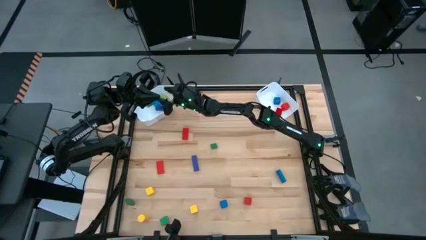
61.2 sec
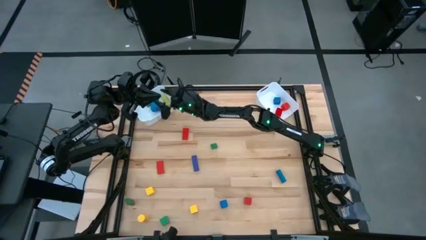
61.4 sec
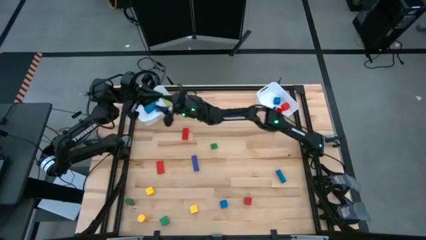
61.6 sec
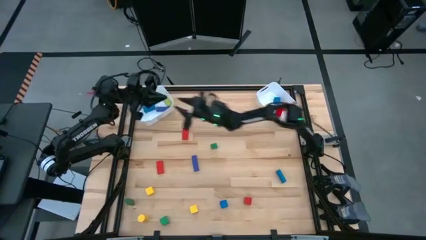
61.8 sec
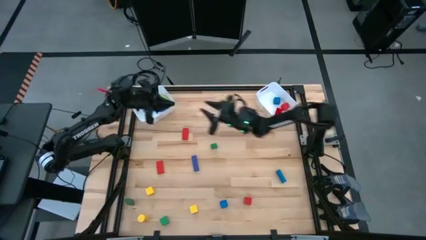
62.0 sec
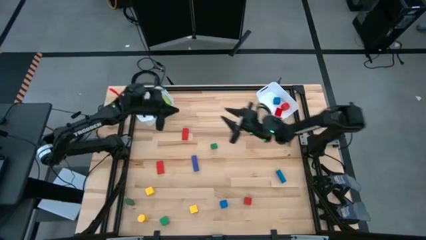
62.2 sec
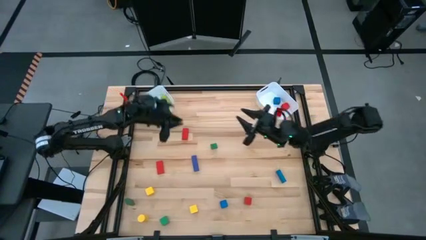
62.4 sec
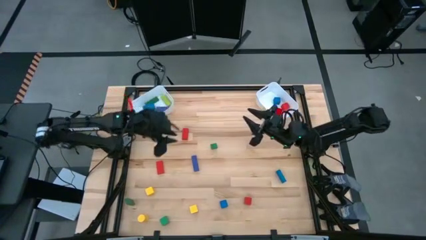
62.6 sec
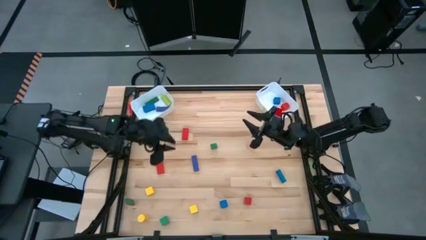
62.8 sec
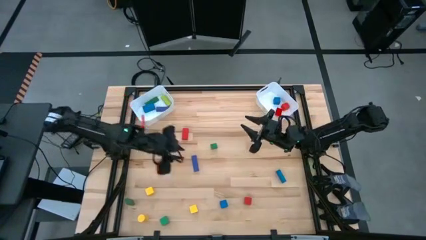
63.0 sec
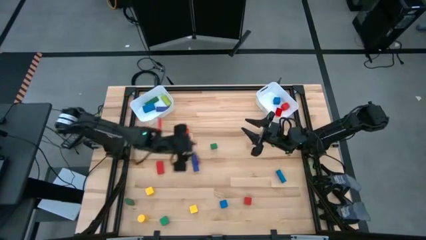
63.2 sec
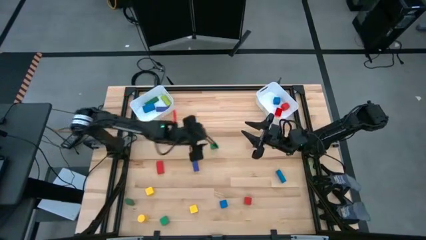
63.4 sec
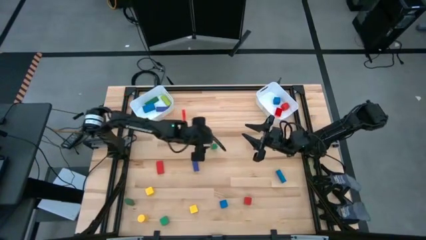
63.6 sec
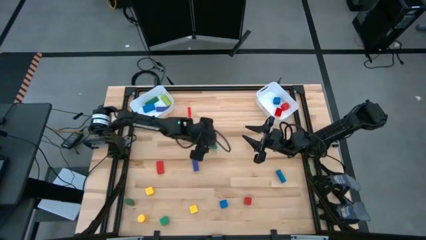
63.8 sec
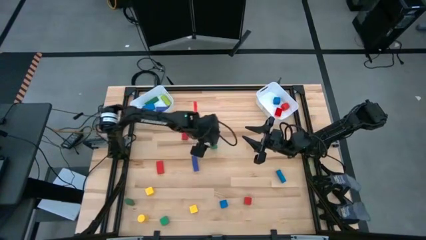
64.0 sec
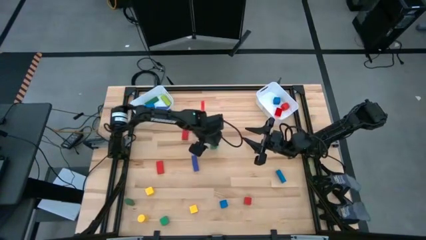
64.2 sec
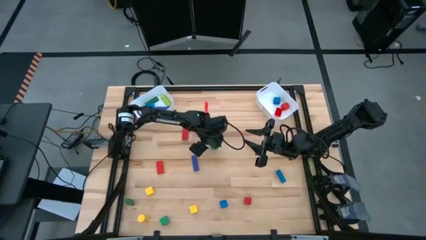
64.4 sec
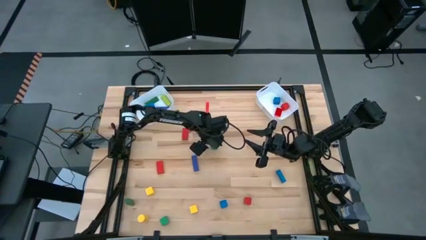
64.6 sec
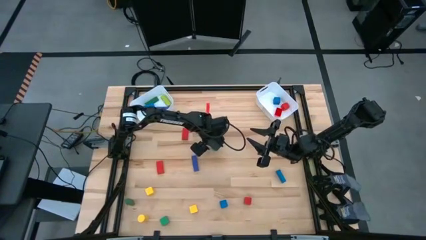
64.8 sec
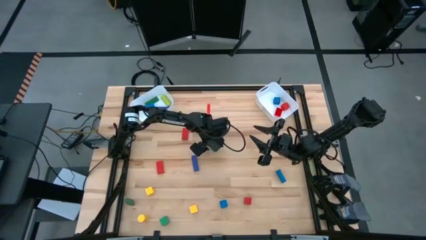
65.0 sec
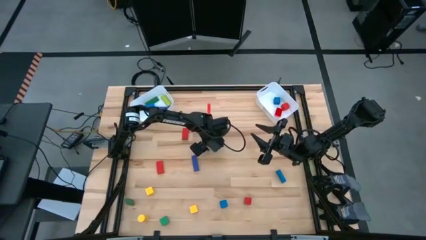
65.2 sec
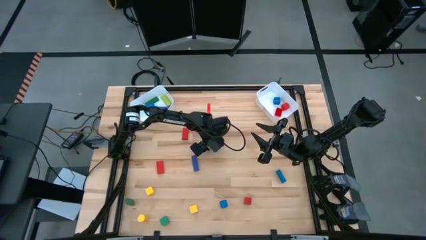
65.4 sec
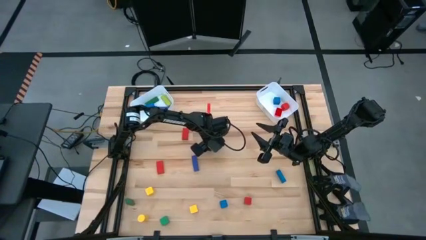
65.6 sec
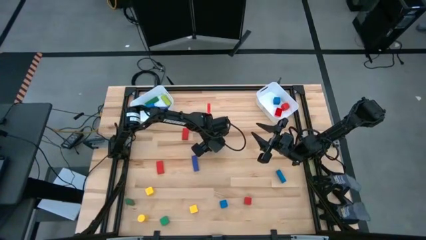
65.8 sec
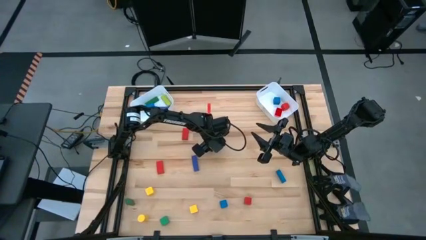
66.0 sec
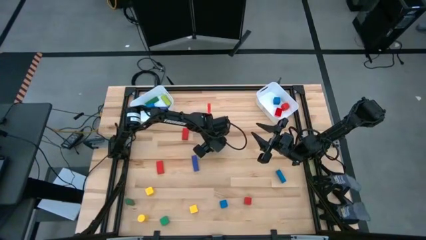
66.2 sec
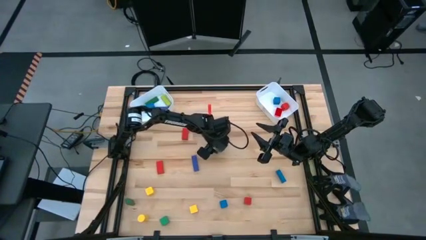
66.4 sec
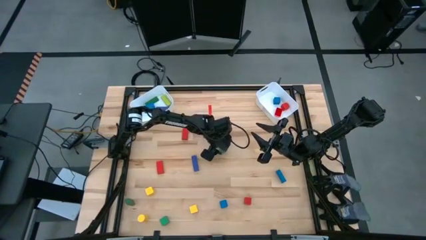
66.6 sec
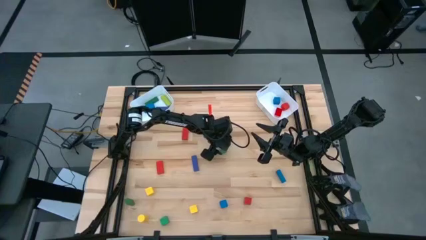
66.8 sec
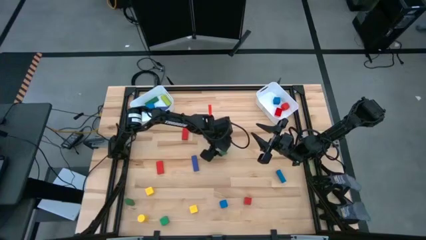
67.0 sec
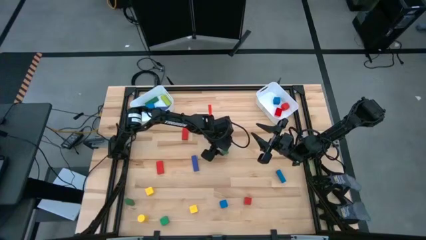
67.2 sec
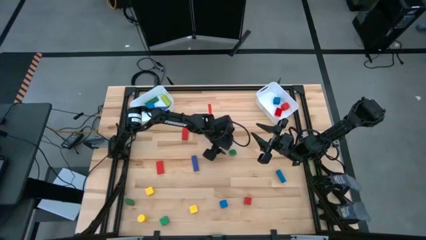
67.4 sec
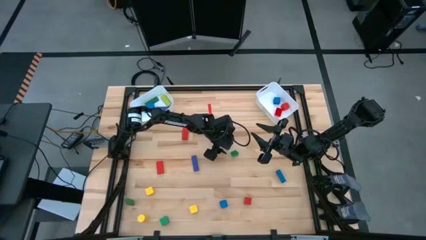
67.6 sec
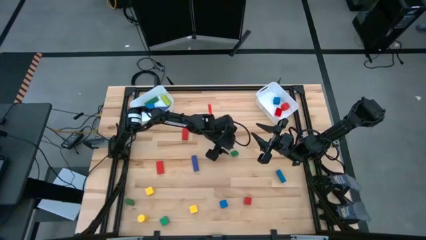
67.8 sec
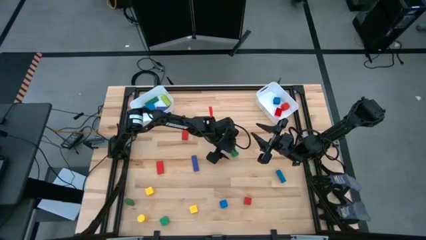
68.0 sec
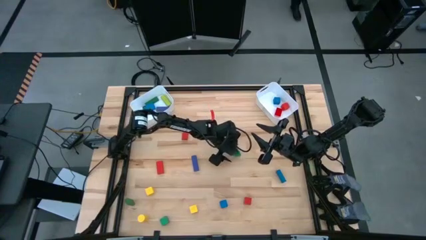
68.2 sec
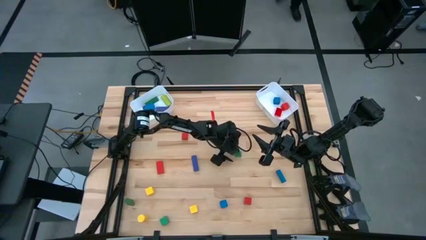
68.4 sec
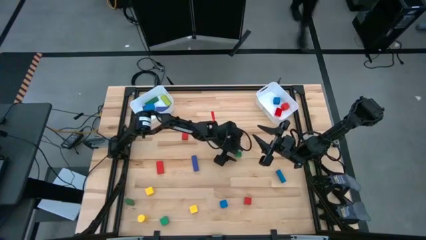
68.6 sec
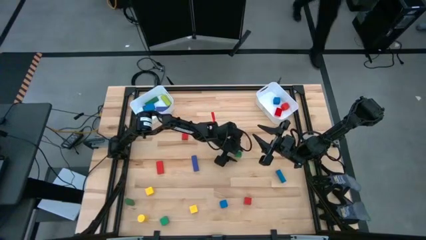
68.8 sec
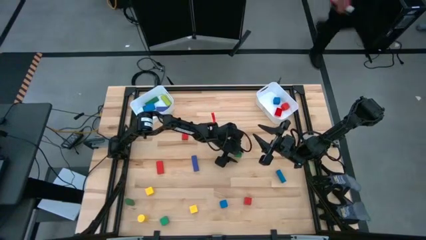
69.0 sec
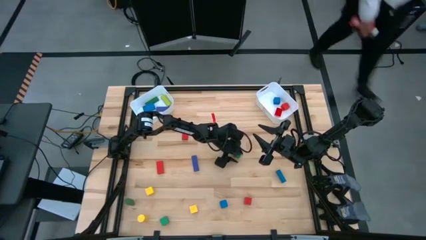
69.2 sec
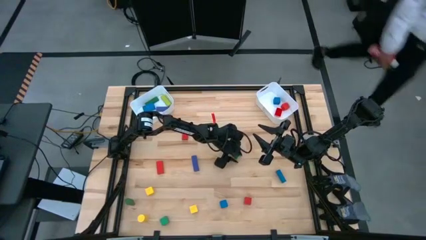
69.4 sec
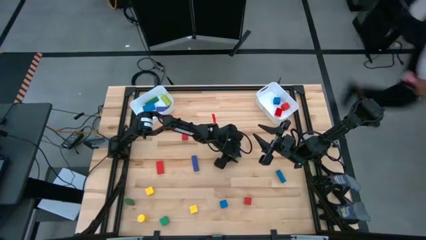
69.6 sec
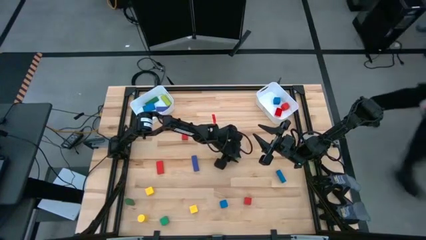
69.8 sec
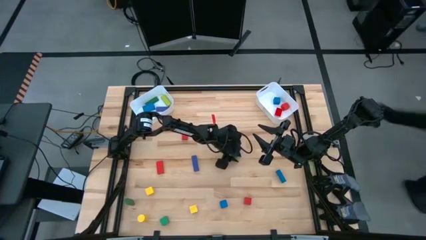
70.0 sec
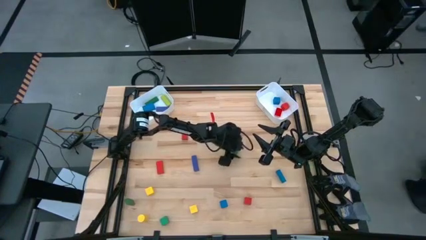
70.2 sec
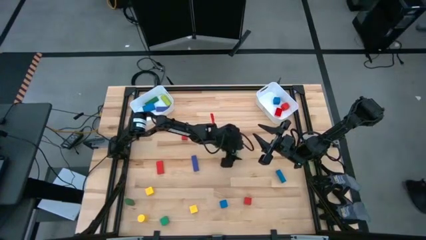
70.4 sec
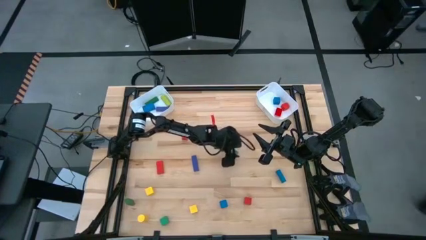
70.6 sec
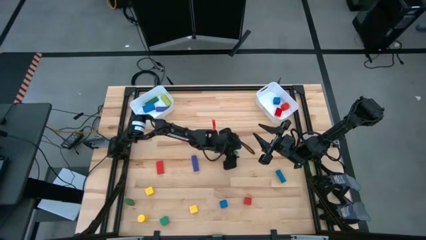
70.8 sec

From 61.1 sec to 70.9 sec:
Task: Sort blocks by size
Put the small green block into the right white bin

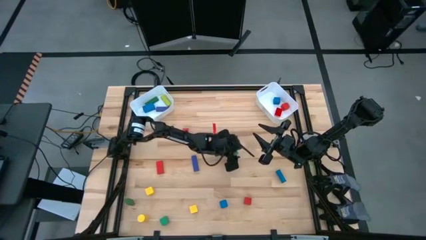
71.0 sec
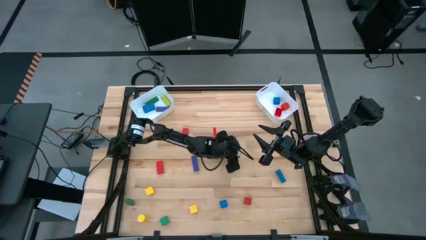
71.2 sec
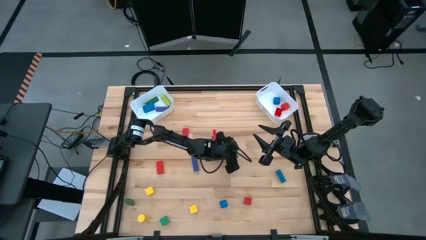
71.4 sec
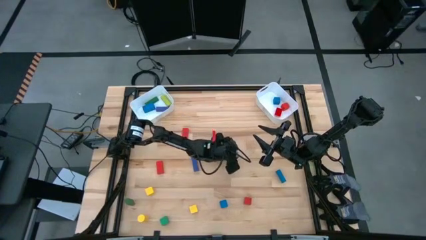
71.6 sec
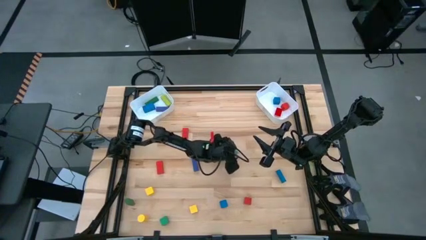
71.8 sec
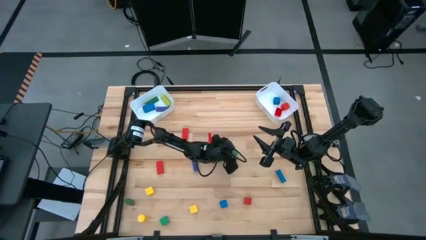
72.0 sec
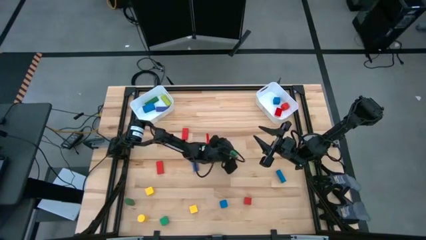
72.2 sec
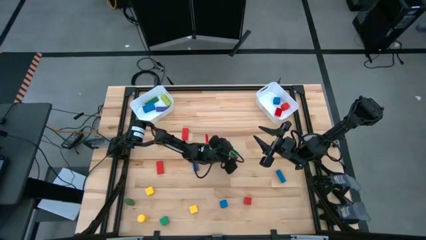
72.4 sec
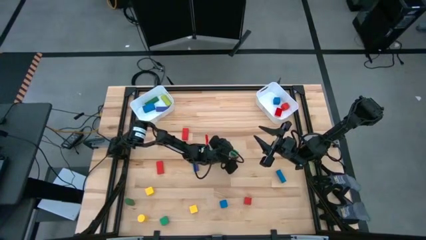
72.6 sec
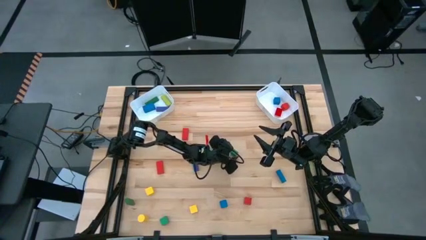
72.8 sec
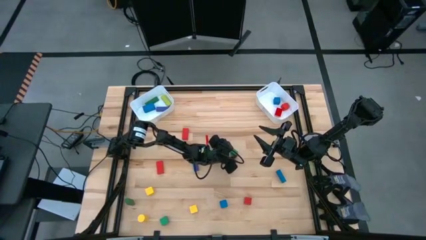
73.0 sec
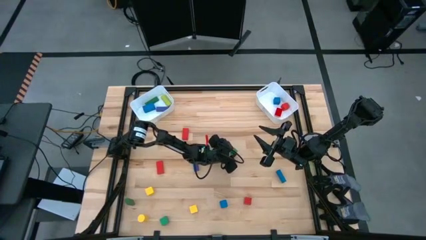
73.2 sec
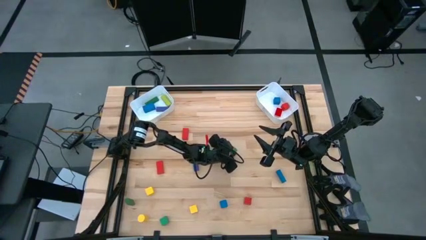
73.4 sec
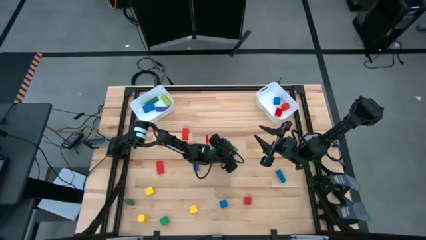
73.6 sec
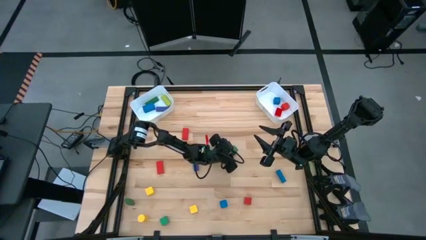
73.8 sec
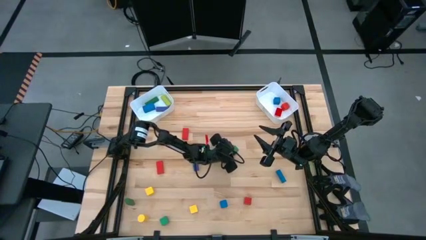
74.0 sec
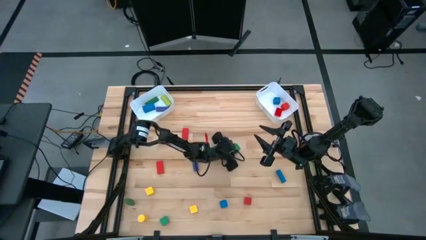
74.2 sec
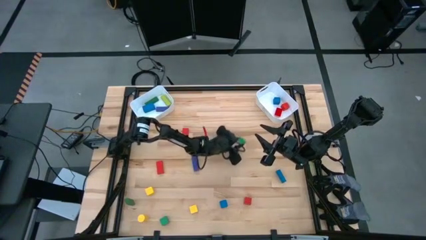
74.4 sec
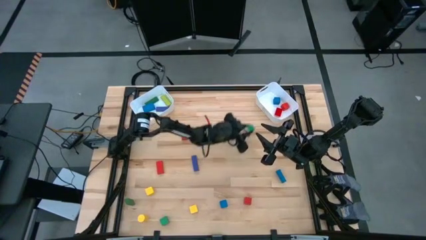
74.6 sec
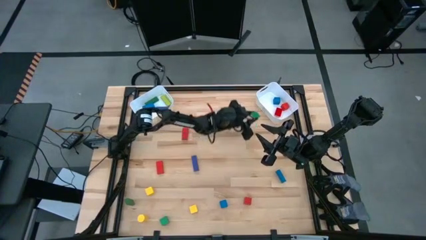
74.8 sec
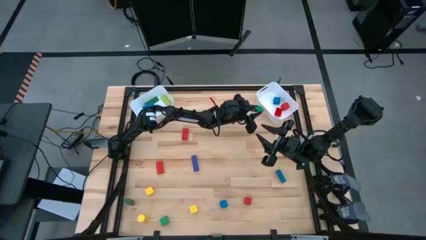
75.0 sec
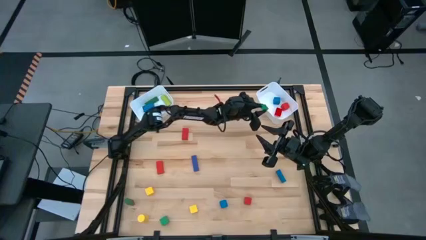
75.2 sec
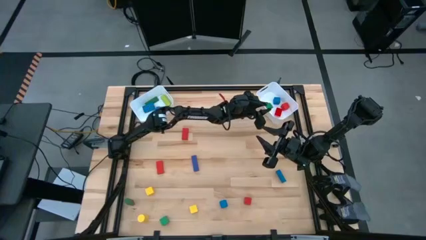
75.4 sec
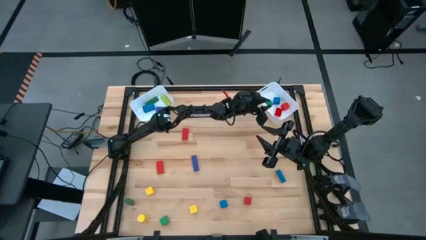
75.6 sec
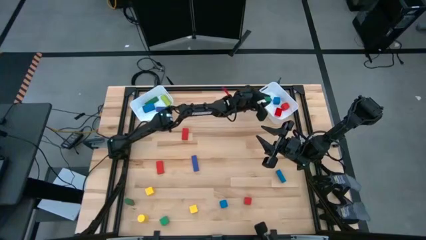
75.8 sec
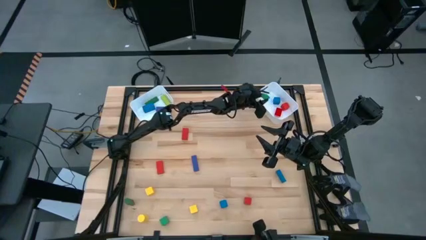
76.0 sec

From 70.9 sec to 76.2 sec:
Put the small green block into the right white bin
